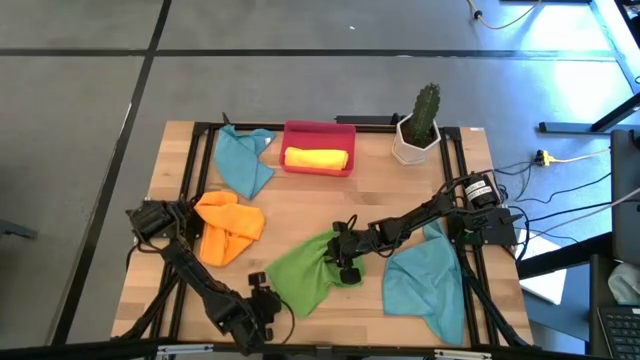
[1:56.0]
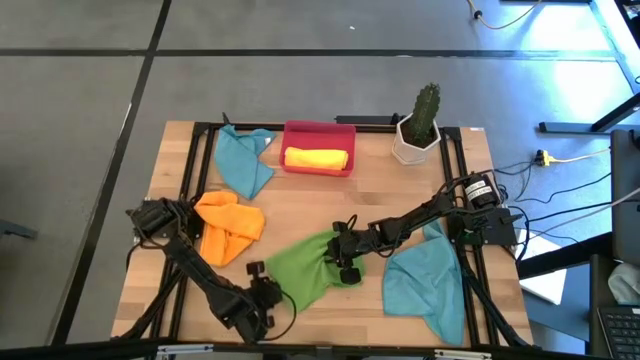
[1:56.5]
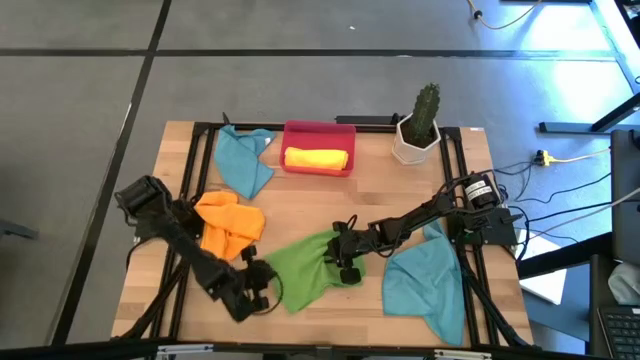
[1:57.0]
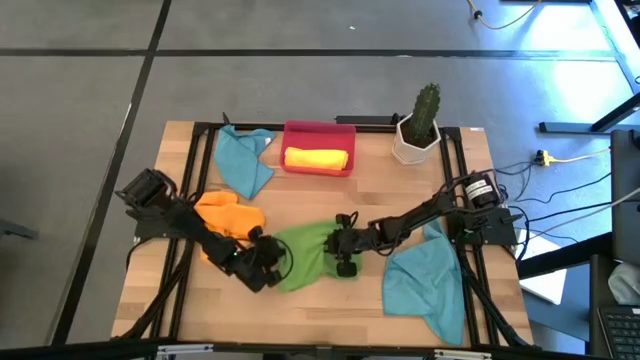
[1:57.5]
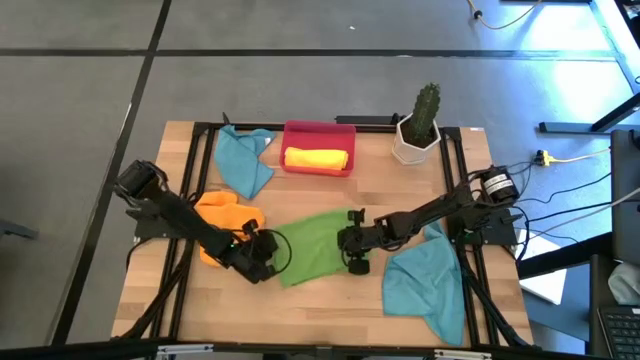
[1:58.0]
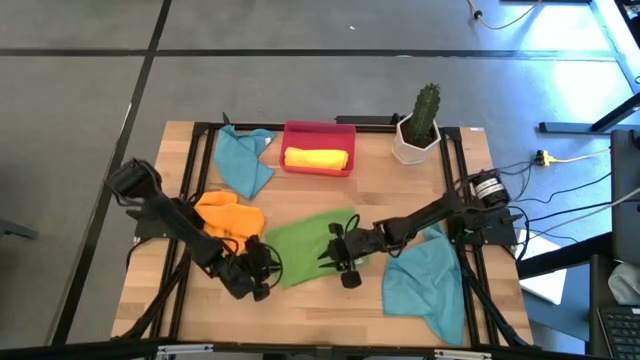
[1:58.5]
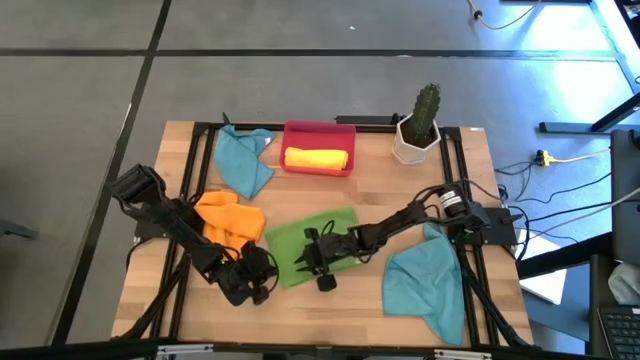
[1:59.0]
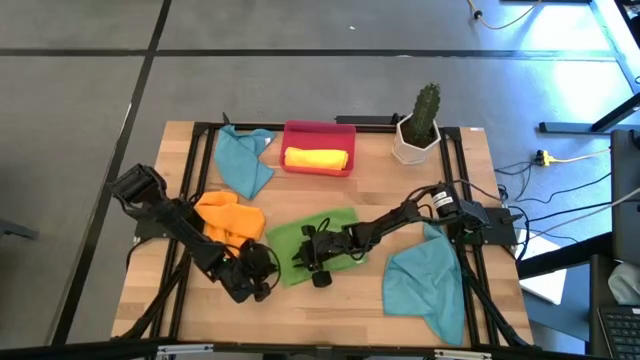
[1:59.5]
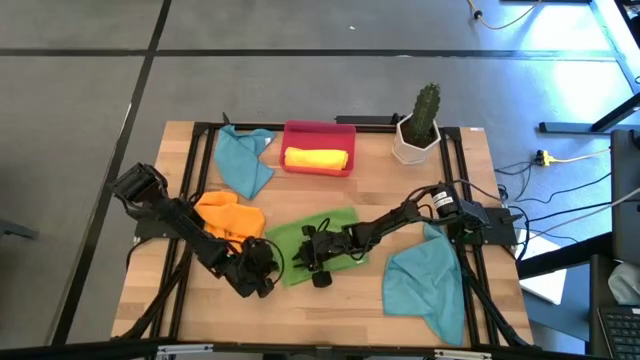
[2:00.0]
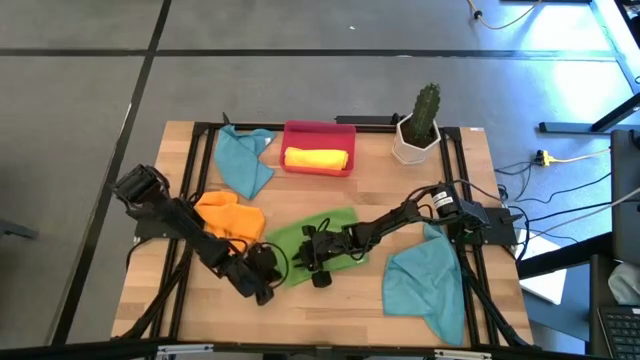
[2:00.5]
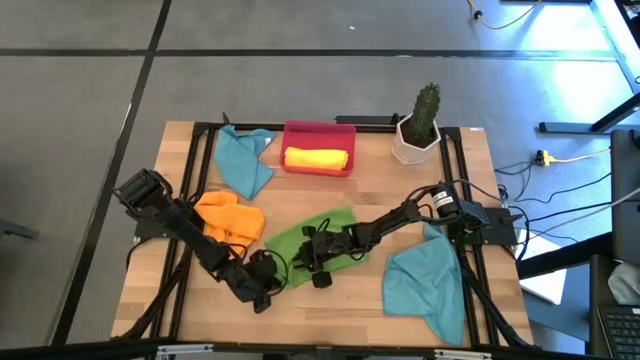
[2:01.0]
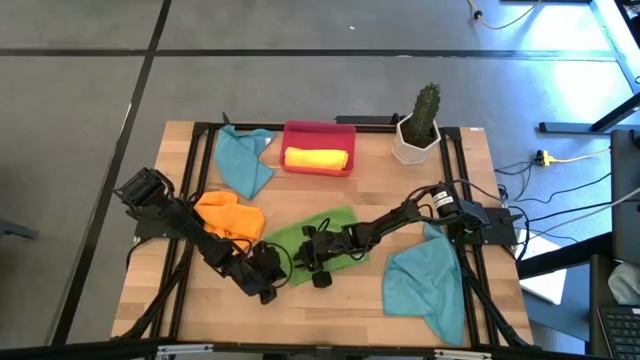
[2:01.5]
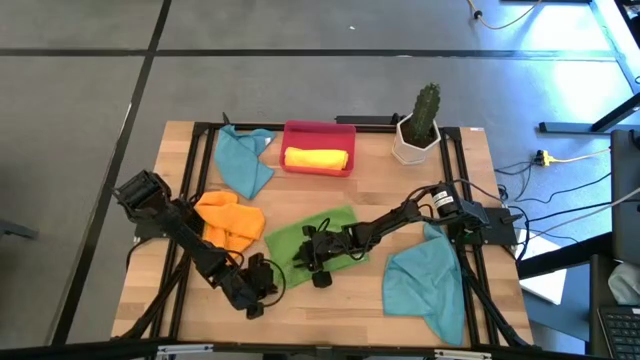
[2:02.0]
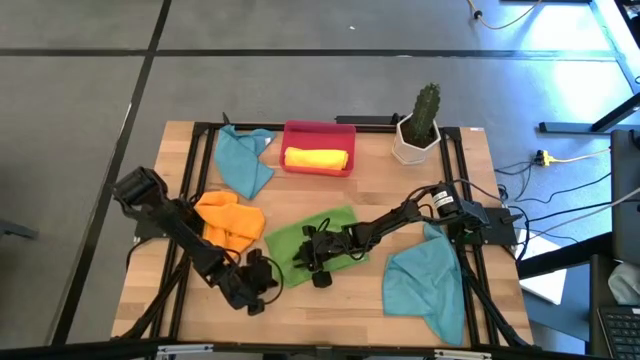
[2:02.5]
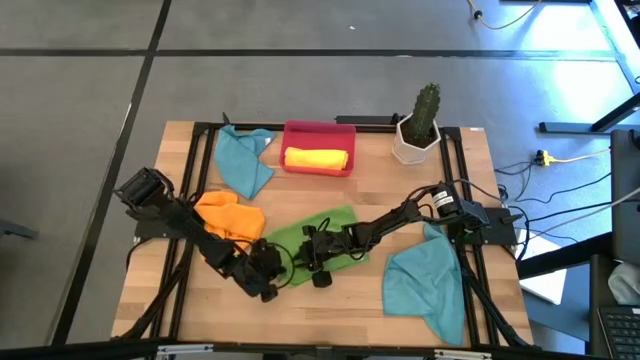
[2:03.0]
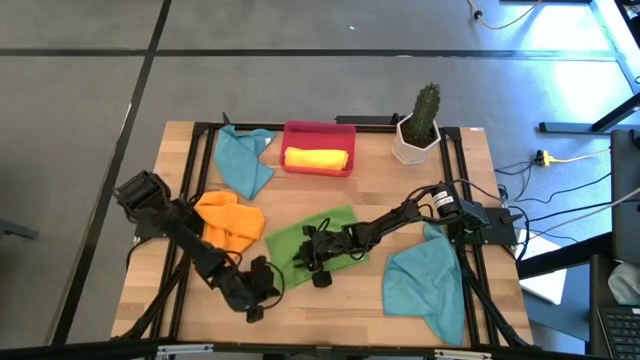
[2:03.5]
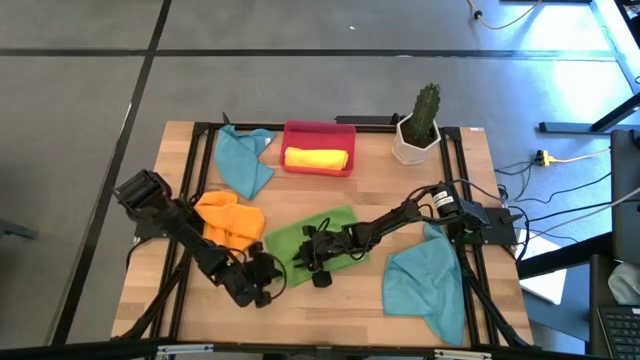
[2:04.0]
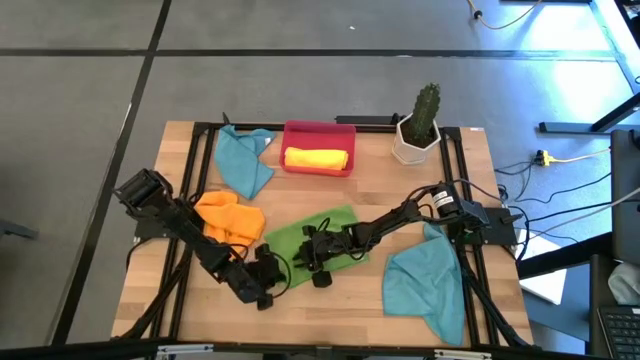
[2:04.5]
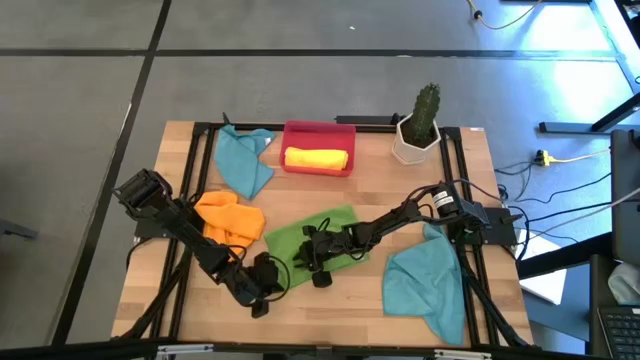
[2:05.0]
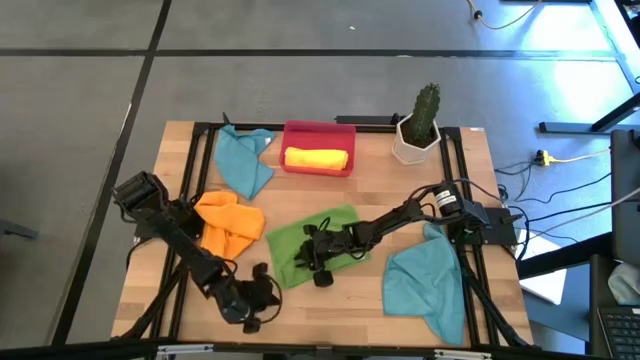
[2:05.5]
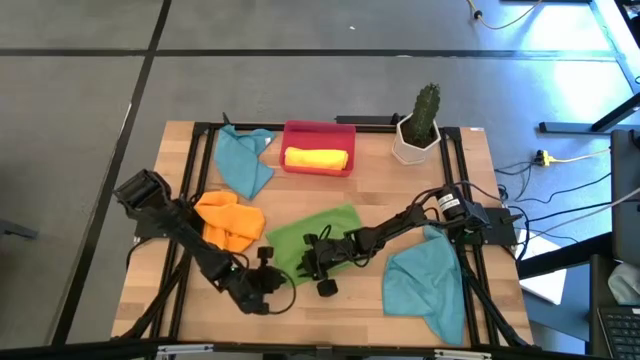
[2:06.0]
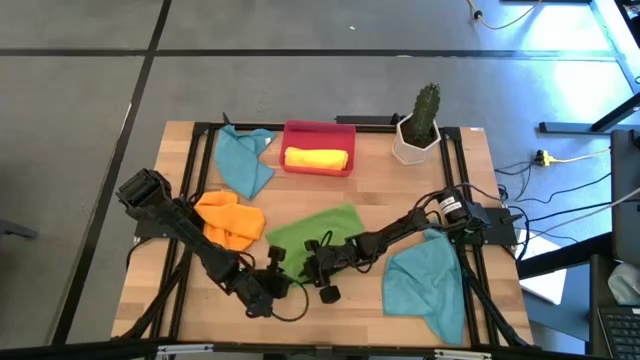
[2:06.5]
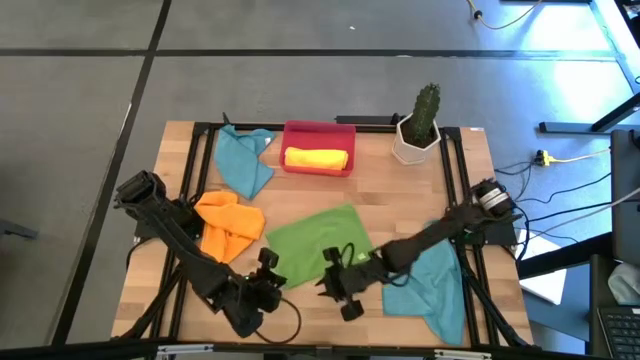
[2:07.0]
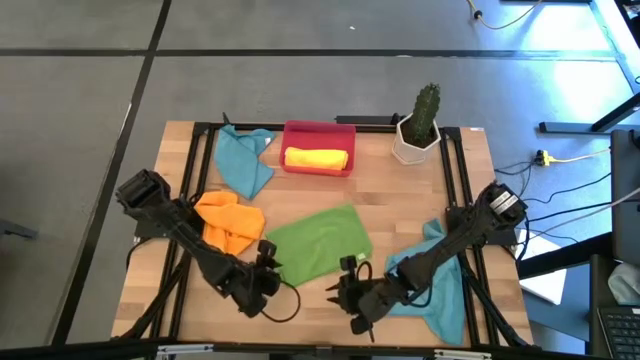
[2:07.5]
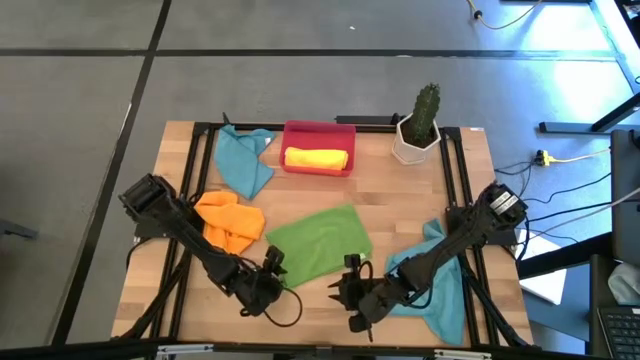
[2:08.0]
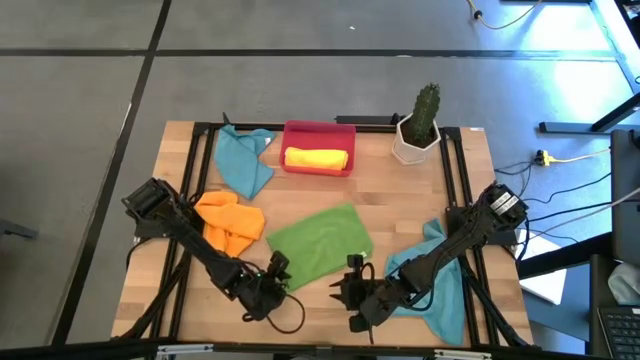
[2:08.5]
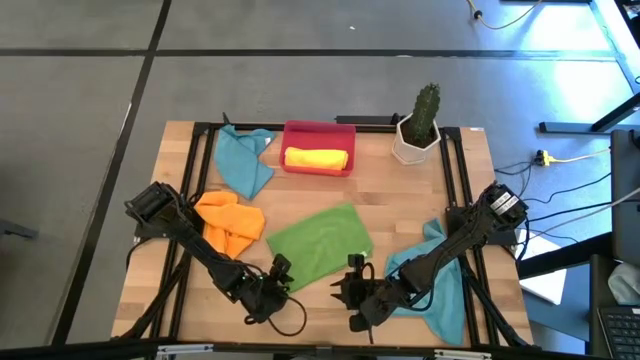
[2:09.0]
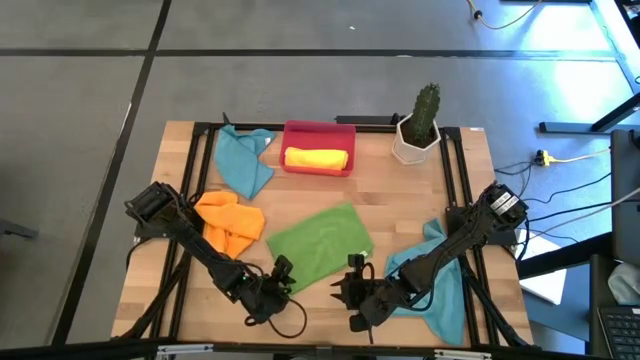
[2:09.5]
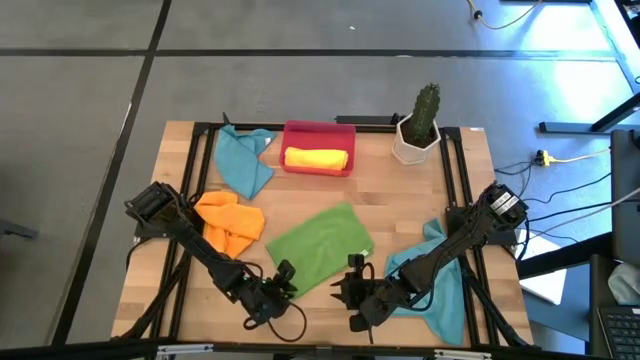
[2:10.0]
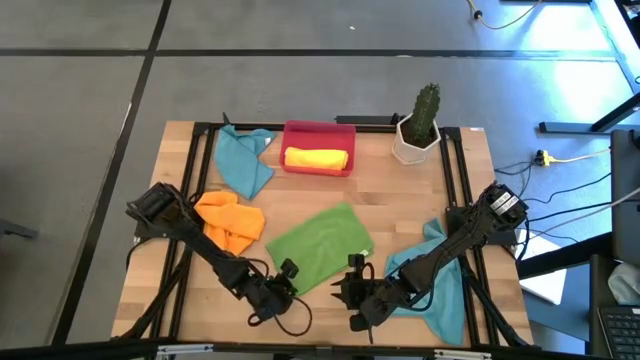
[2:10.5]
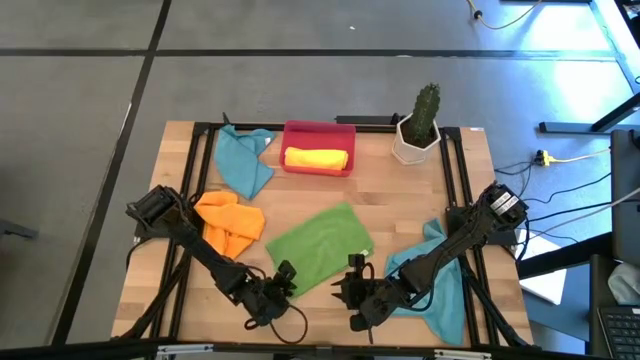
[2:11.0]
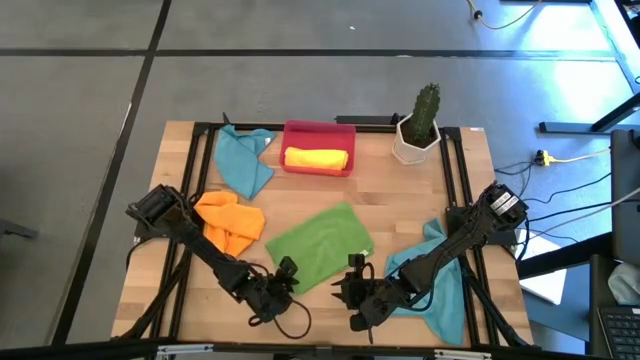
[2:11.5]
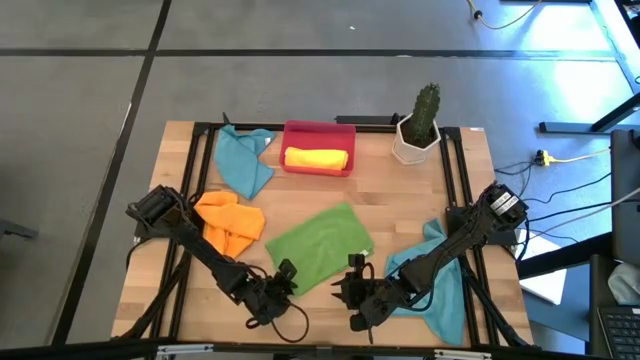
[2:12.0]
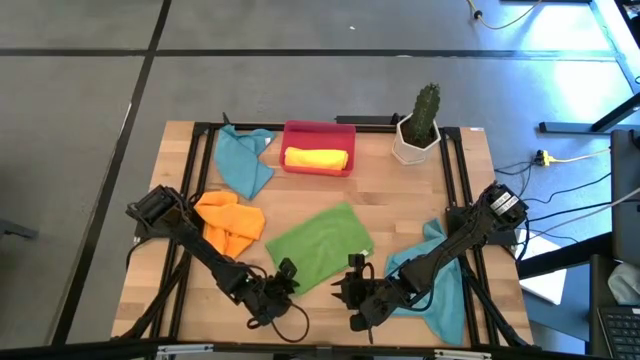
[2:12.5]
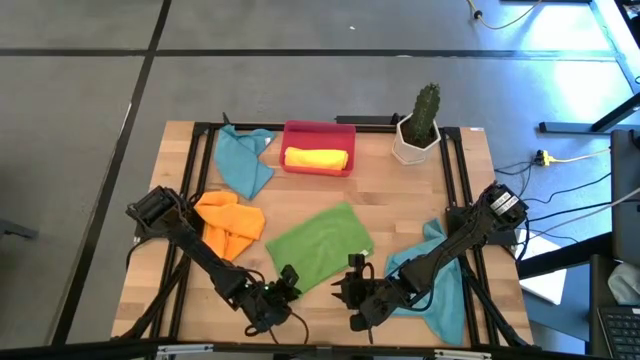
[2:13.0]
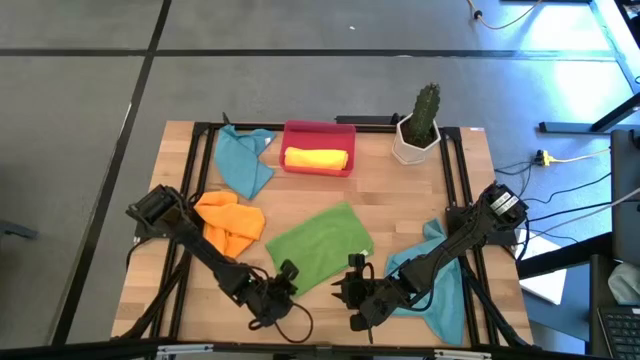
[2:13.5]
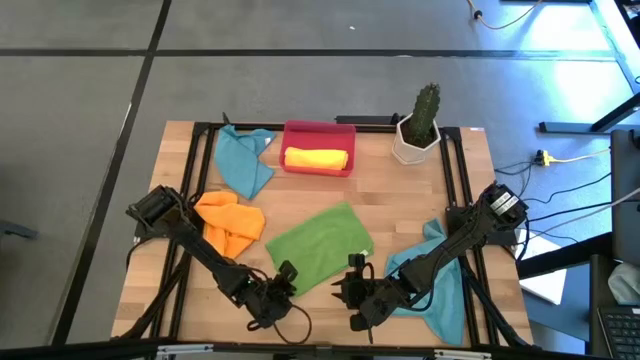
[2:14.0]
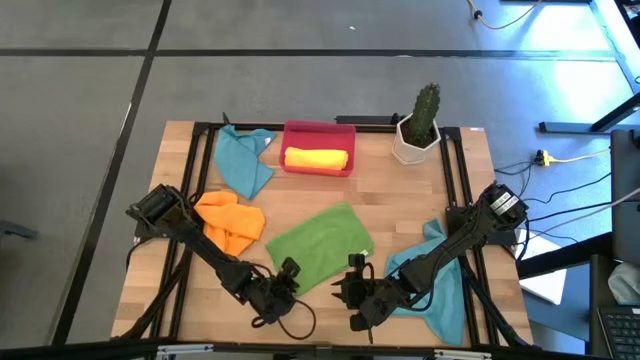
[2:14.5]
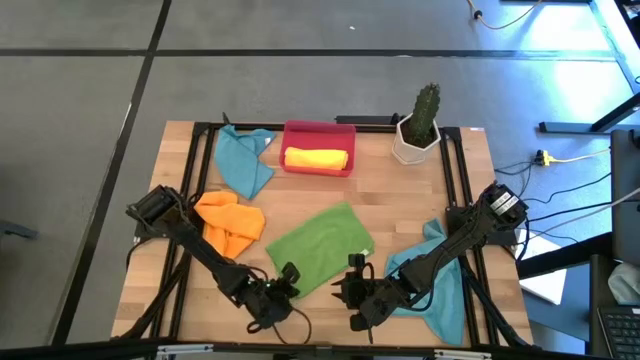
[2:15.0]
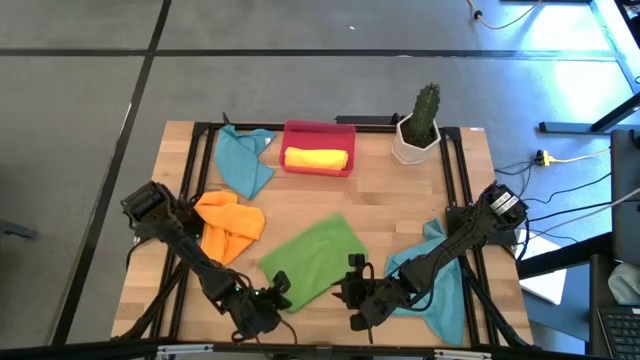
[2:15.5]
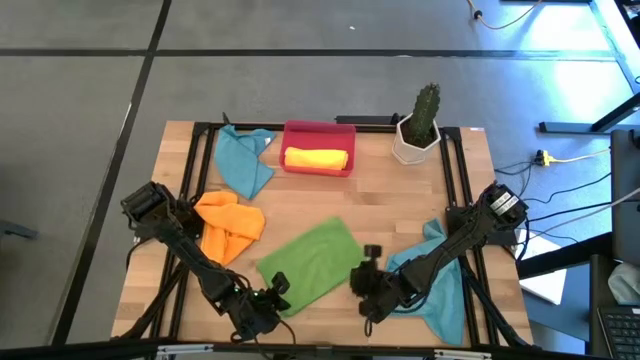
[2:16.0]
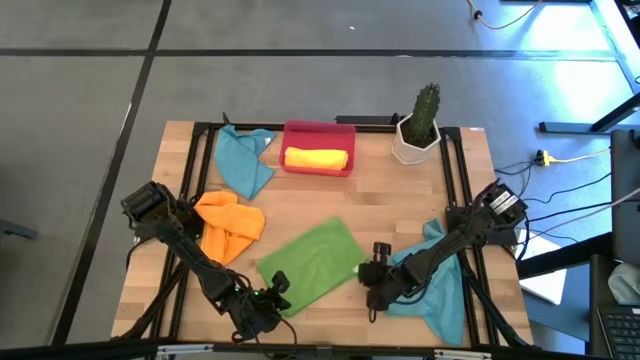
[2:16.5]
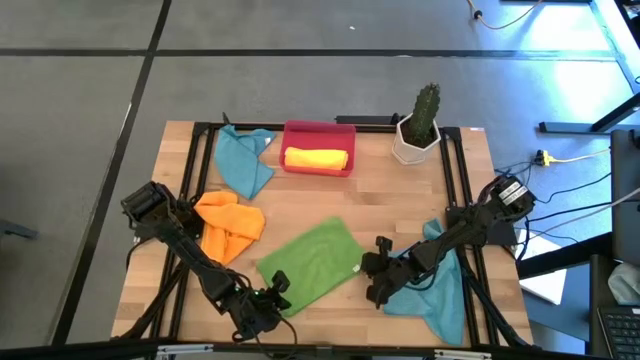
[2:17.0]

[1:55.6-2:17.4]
Task: Roll microfiber towels into tight, uniform cylinder then place into a basket
Roll the green towel
